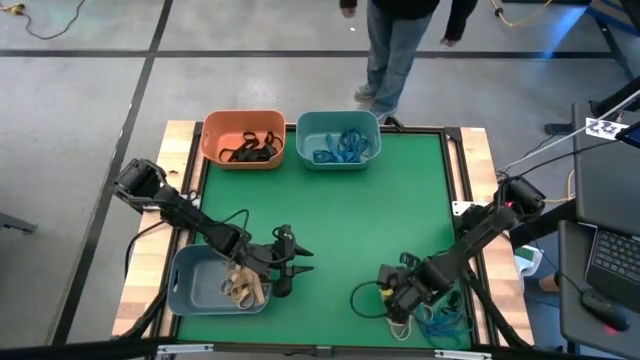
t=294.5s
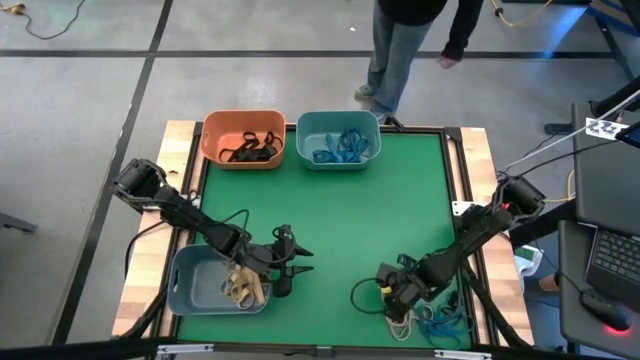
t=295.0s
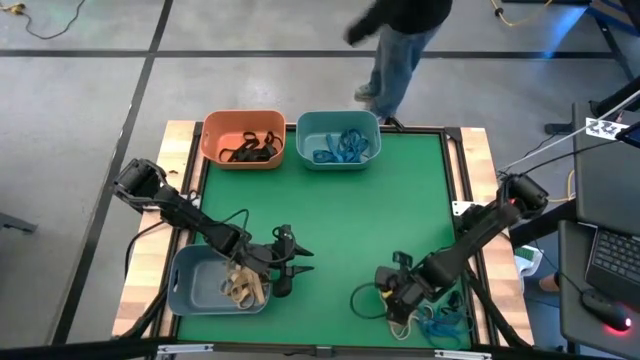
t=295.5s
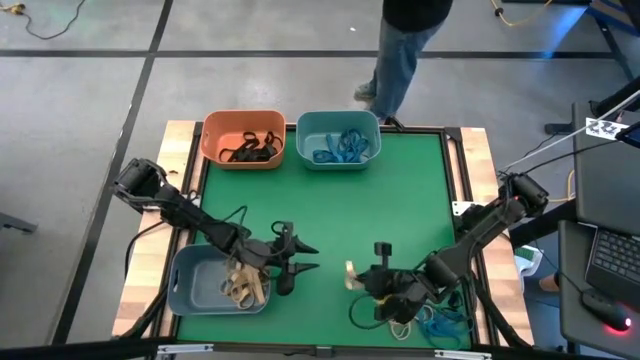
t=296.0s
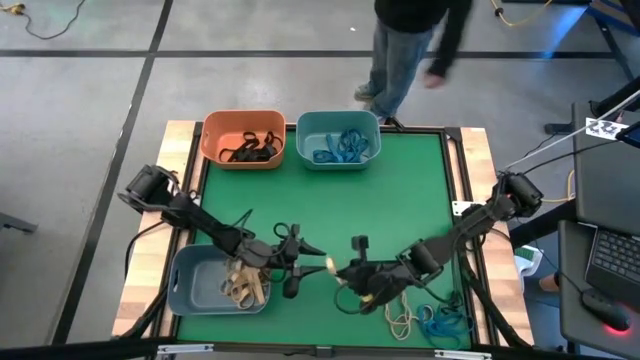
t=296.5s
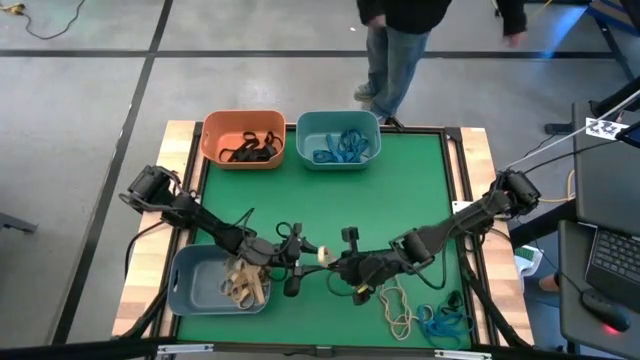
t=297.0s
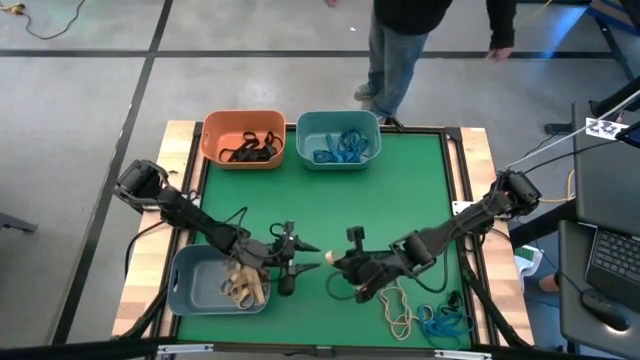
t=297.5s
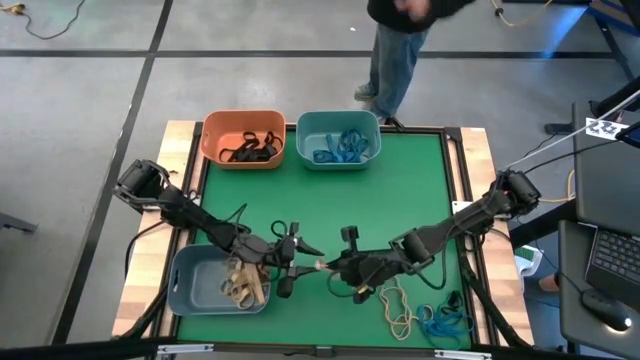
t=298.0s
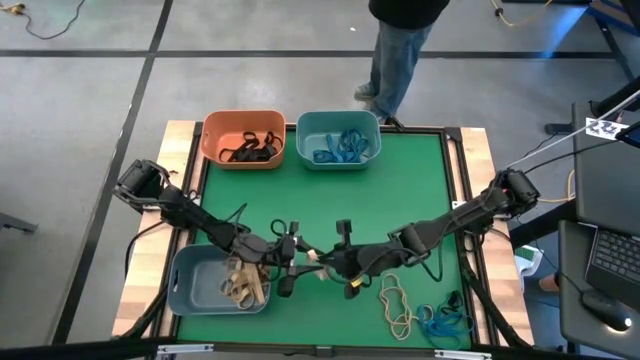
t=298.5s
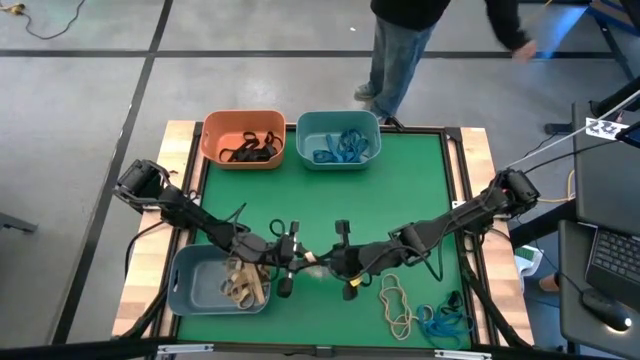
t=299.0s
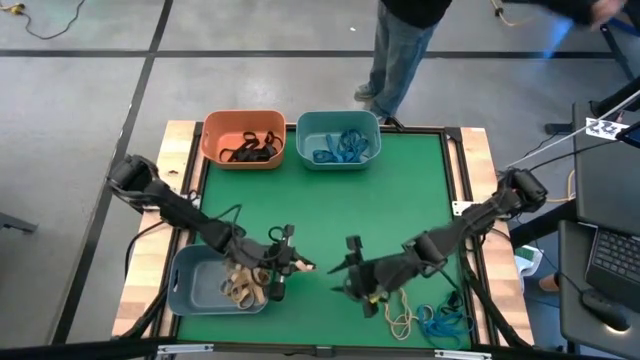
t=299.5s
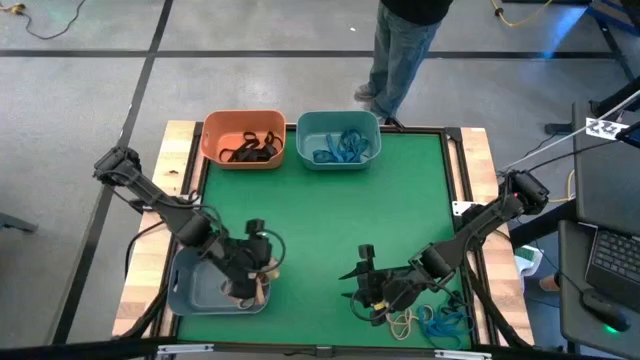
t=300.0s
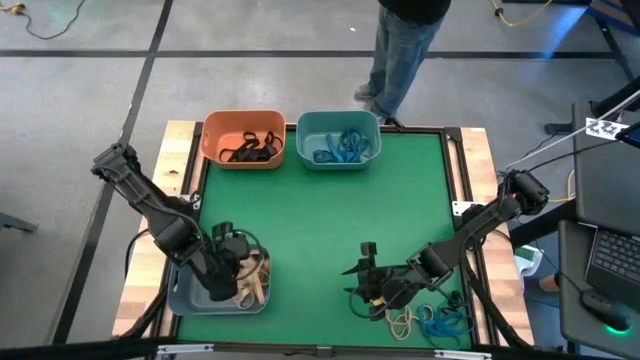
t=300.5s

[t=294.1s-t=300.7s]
Task: Sort rubber bands into baskets
Put the white rubber band into the blue bin

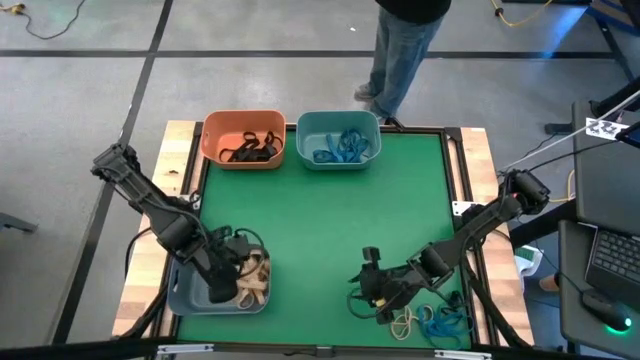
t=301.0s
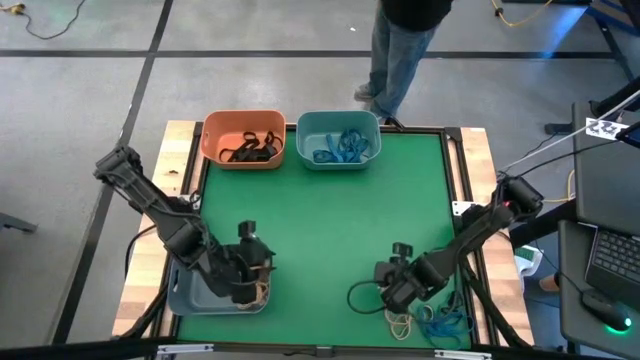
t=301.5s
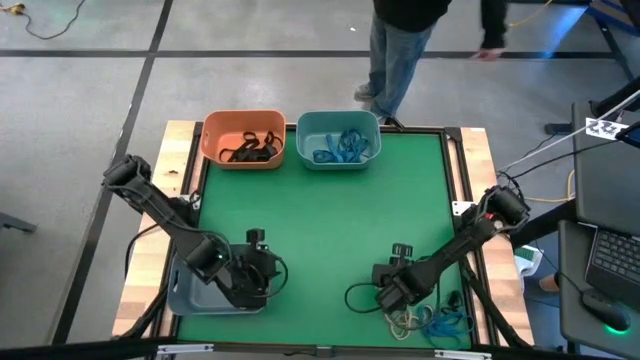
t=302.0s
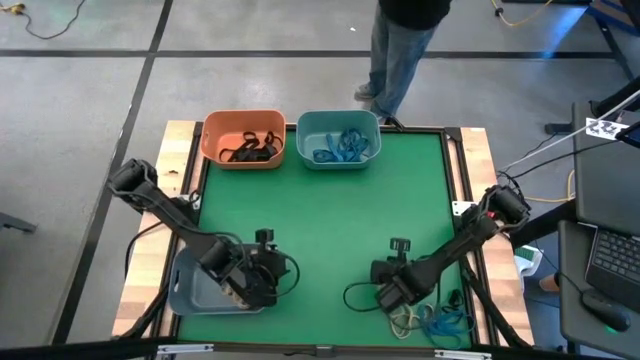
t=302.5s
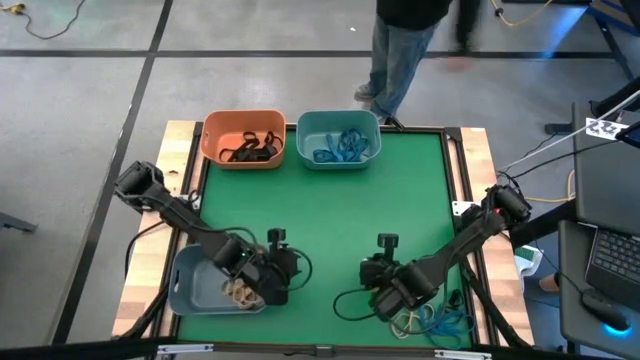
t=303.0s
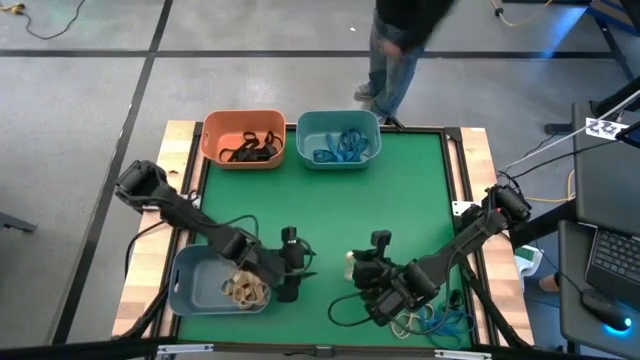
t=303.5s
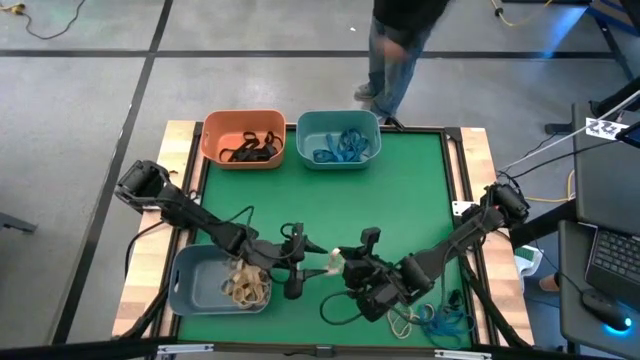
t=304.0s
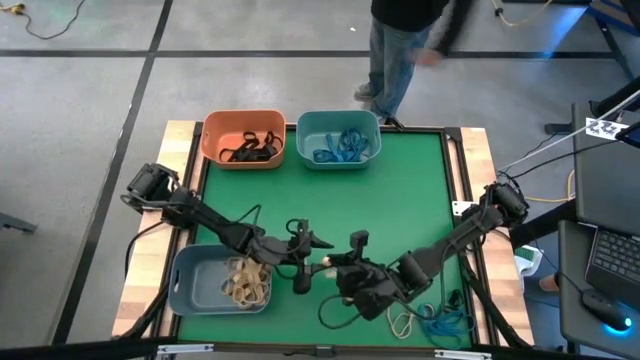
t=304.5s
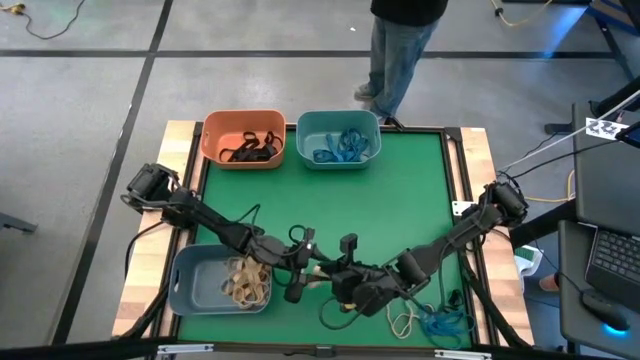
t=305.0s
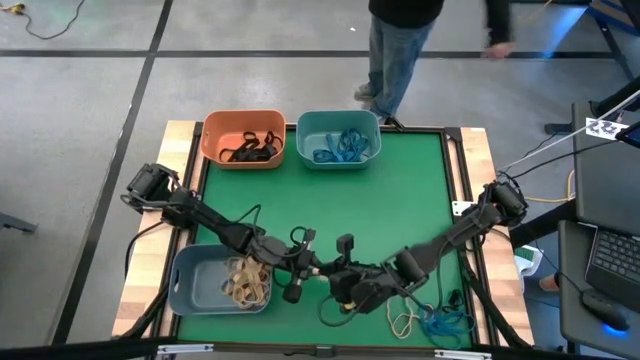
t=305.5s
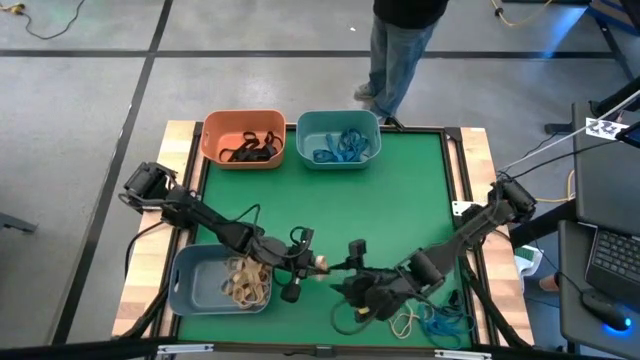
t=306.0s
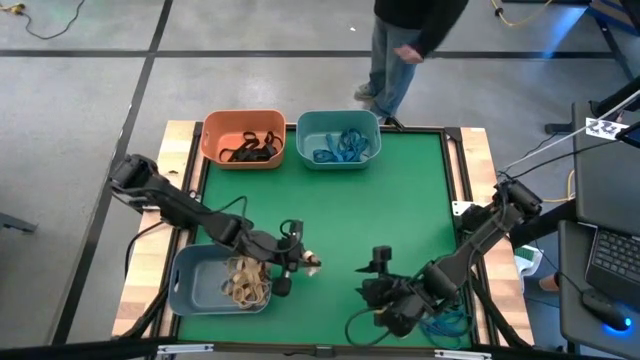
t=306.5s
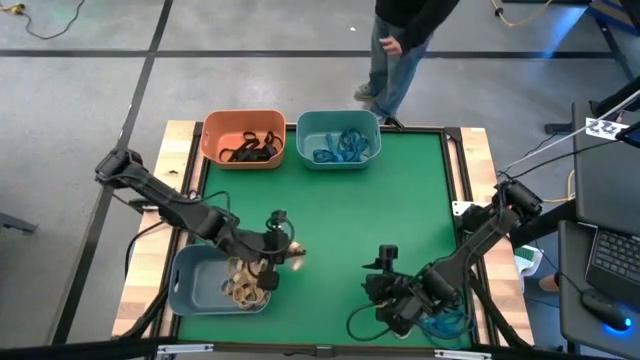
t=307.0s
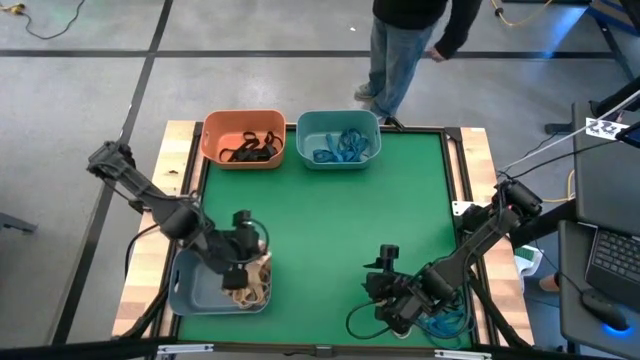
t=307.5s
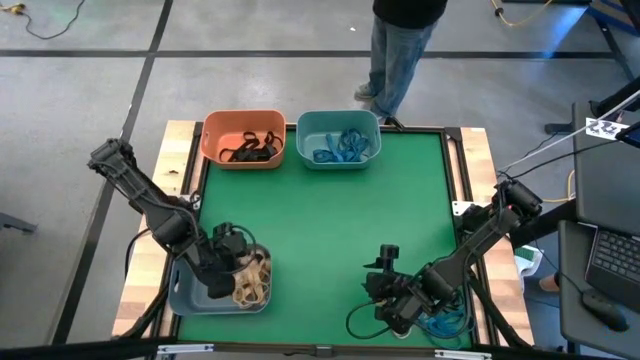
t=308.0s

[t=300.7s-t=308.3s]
Put the white rubber band into the blue bin

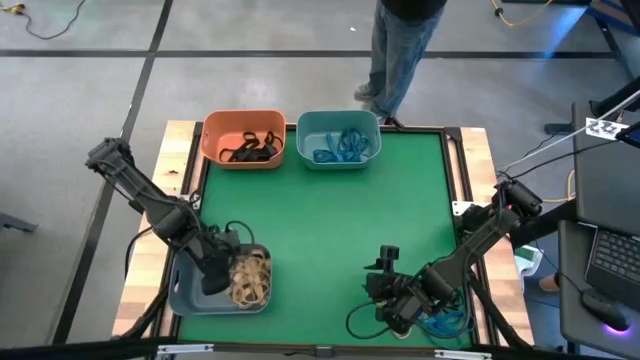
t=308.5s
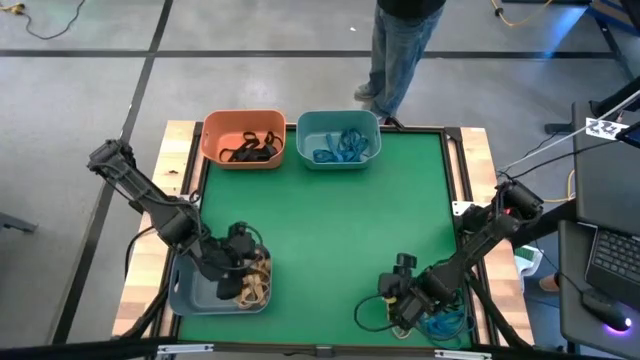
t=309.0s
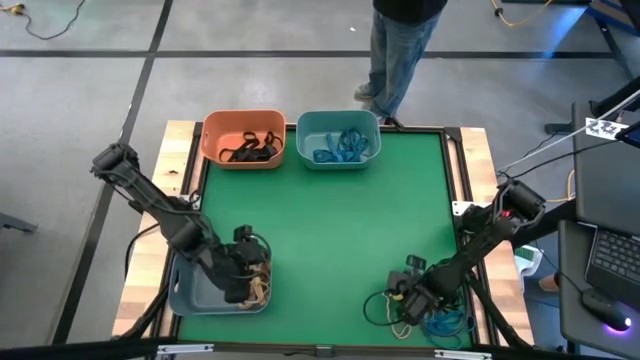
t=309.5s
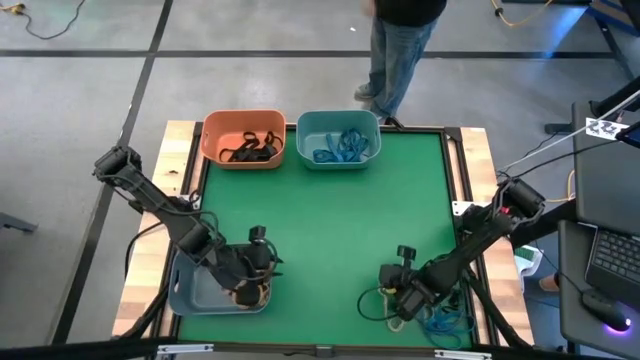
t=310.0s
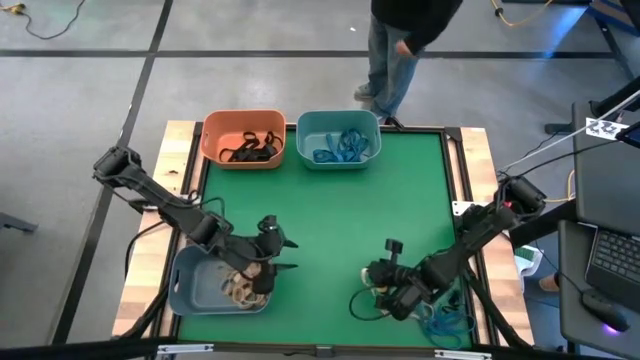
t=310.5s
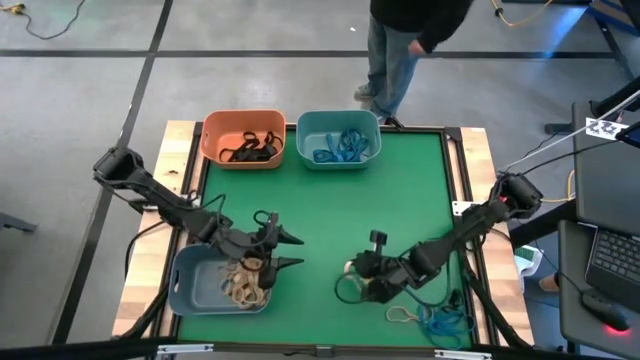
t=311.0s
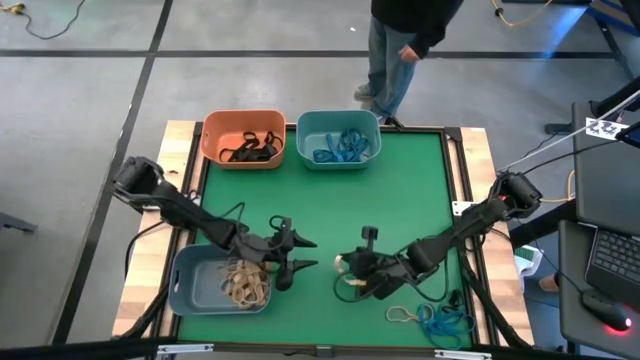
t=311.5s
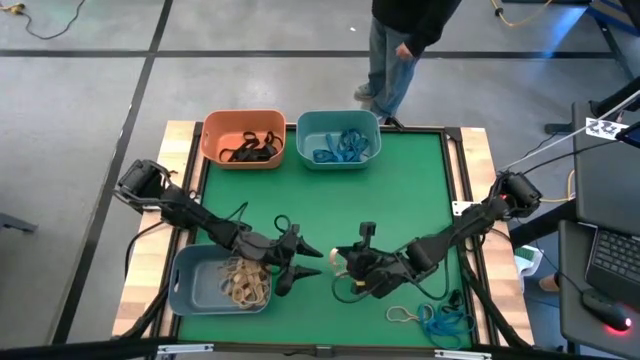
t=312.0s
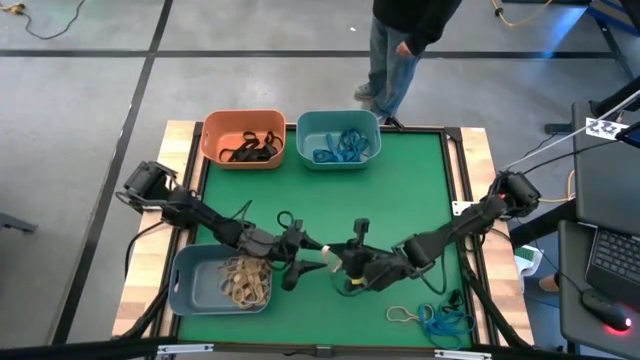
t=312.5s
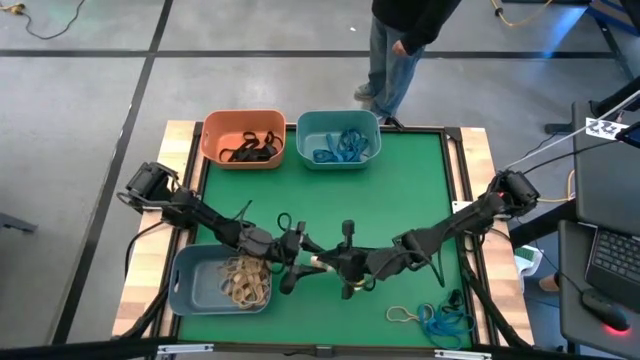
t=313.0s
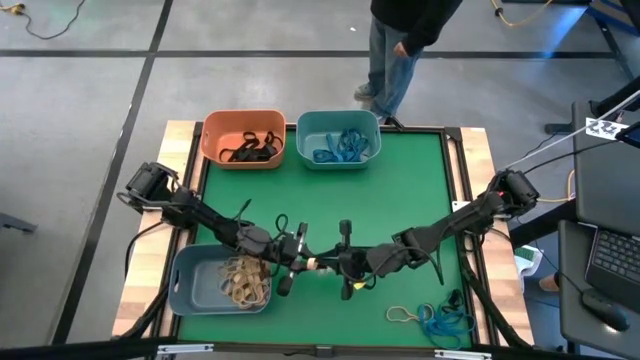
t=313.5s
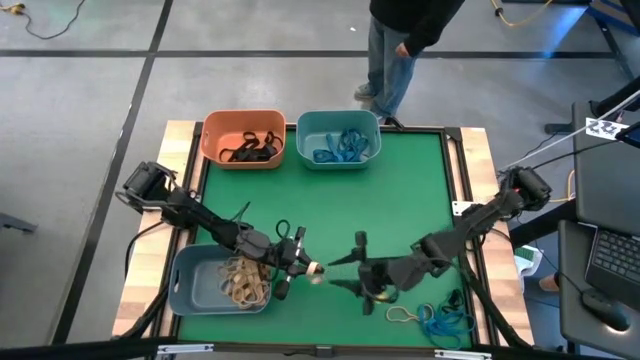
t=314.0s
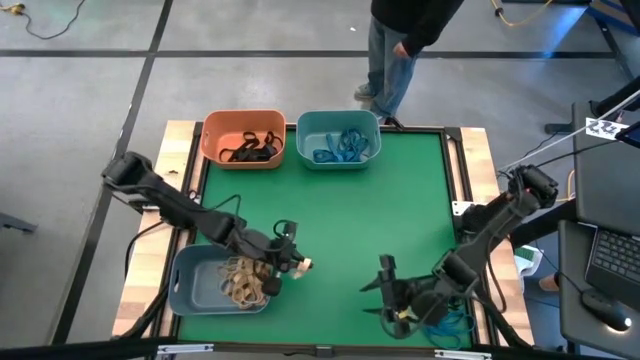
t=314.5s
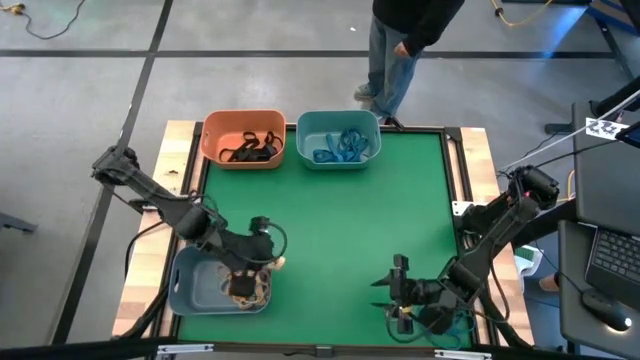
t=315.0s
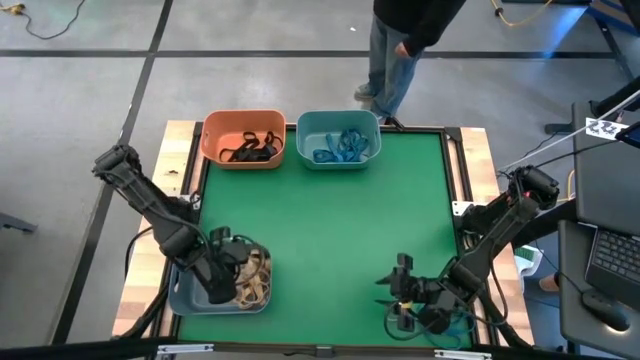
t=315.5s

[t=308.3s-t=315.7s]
Put the white rubber band into the blue bin
